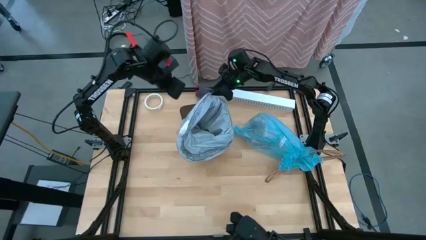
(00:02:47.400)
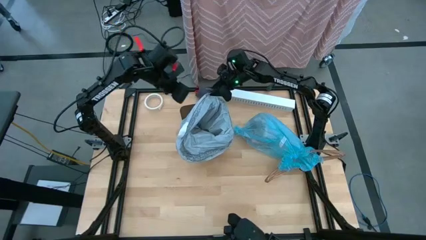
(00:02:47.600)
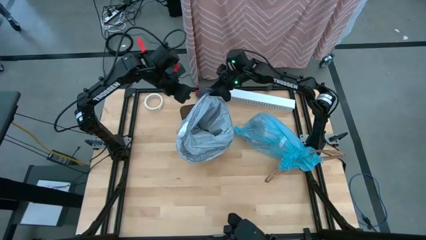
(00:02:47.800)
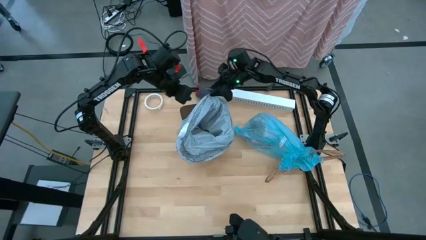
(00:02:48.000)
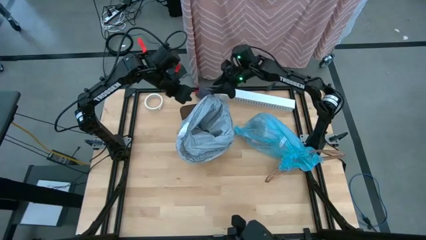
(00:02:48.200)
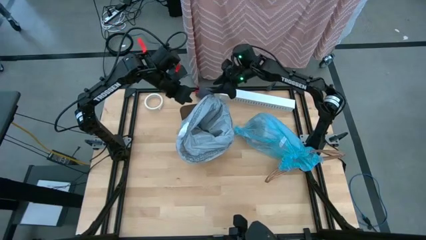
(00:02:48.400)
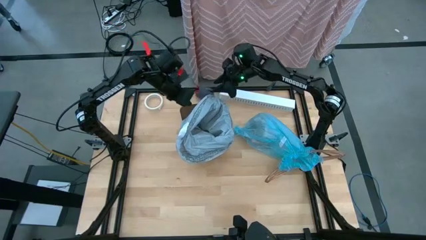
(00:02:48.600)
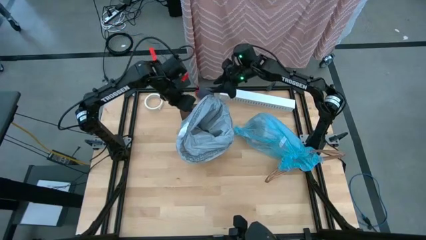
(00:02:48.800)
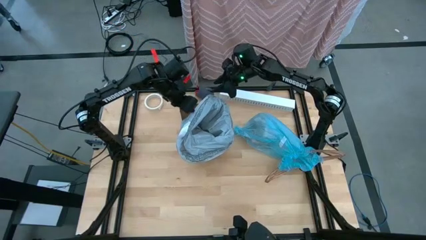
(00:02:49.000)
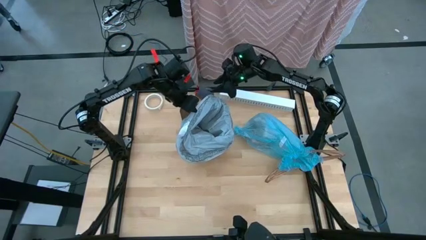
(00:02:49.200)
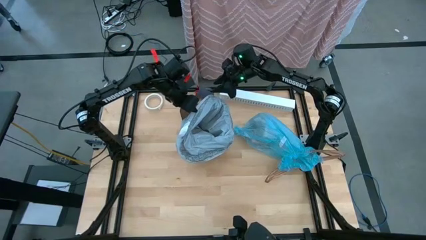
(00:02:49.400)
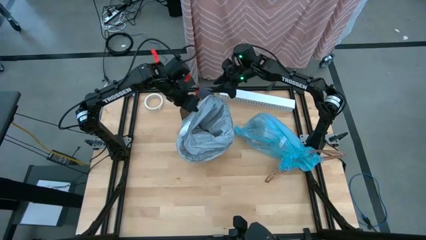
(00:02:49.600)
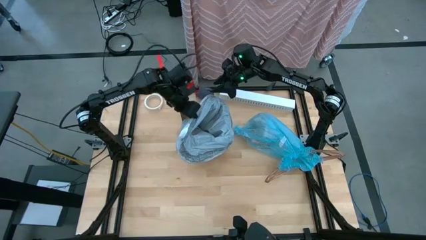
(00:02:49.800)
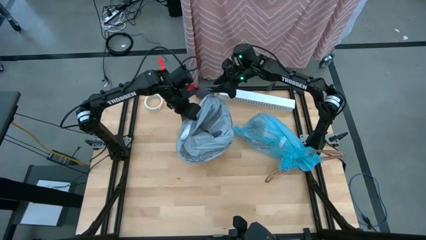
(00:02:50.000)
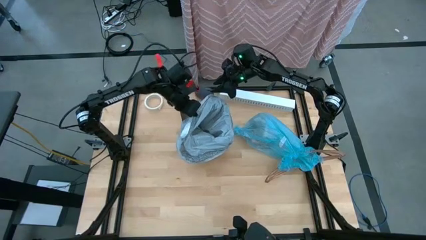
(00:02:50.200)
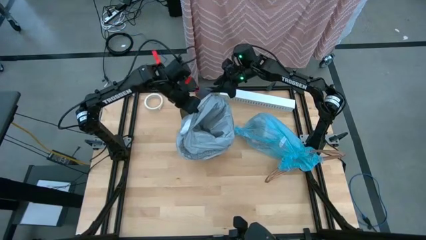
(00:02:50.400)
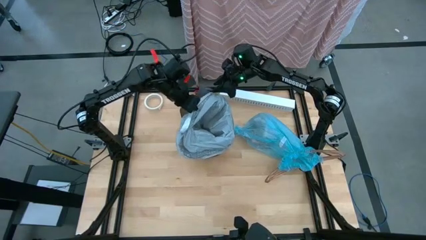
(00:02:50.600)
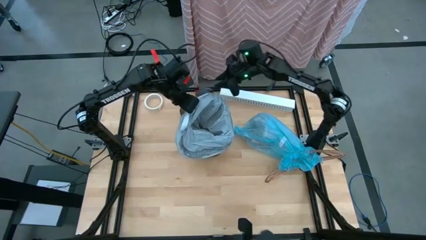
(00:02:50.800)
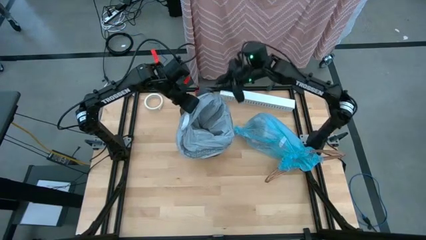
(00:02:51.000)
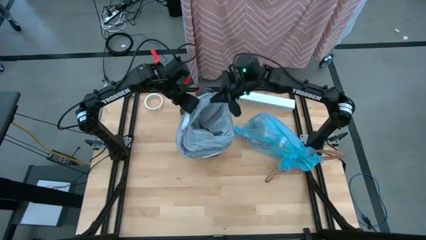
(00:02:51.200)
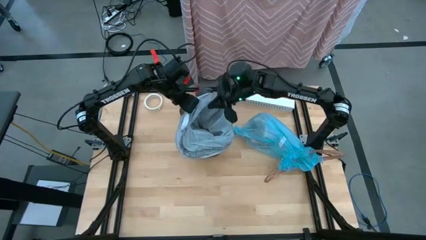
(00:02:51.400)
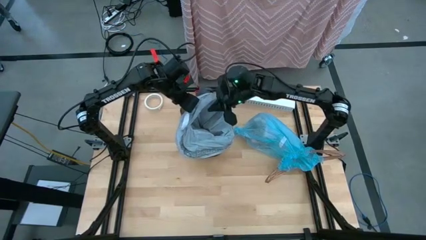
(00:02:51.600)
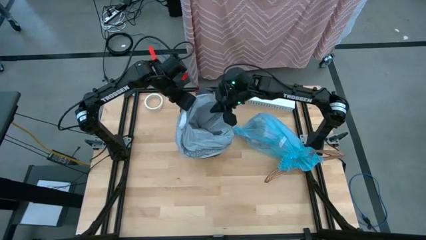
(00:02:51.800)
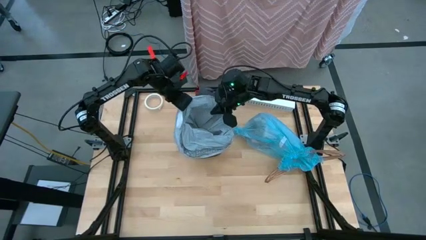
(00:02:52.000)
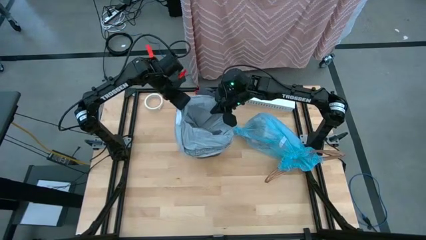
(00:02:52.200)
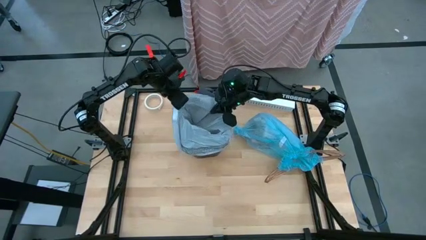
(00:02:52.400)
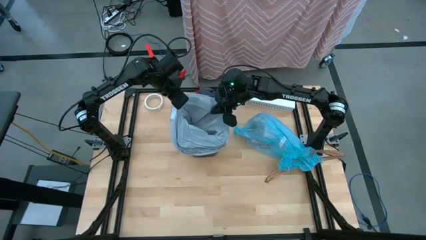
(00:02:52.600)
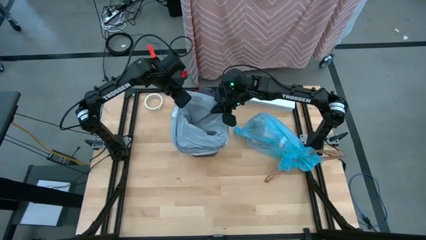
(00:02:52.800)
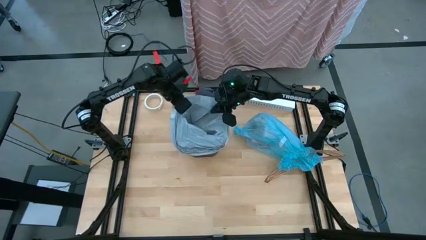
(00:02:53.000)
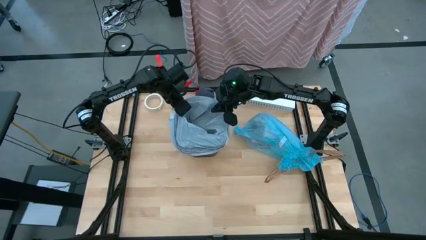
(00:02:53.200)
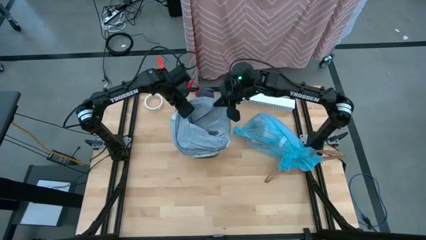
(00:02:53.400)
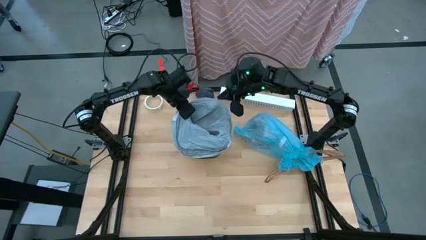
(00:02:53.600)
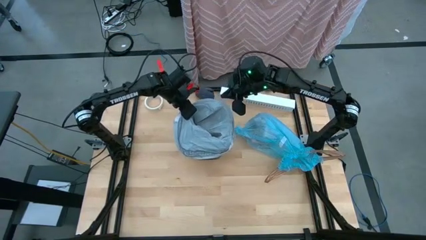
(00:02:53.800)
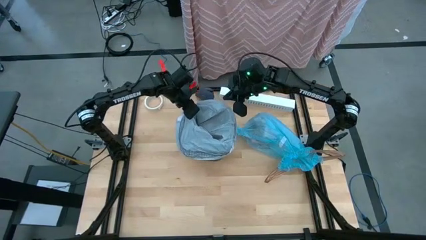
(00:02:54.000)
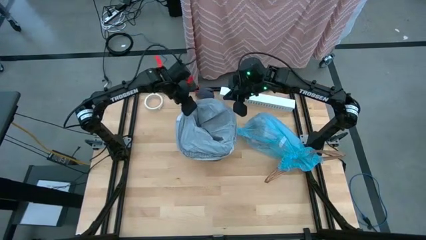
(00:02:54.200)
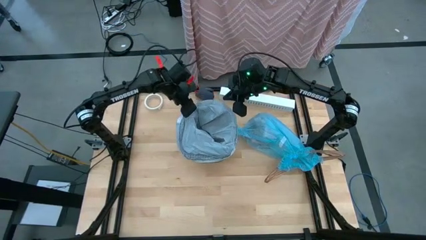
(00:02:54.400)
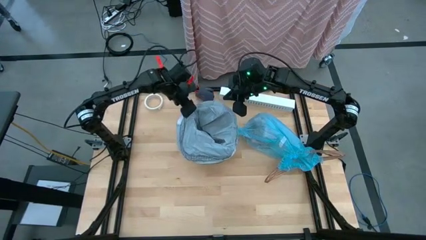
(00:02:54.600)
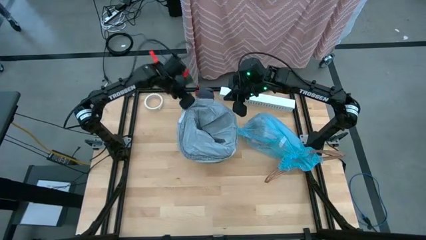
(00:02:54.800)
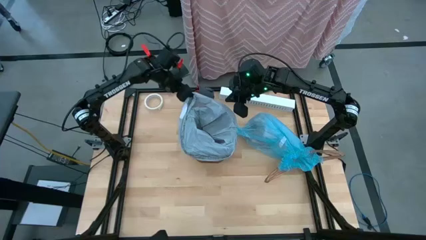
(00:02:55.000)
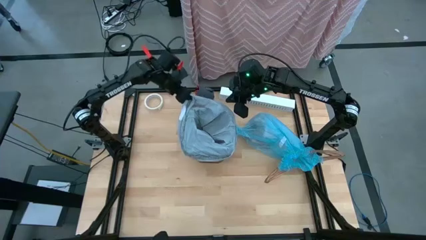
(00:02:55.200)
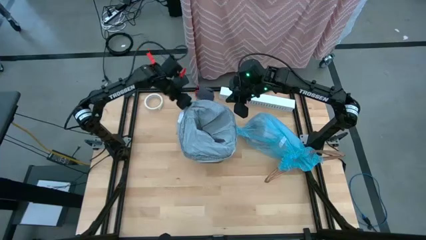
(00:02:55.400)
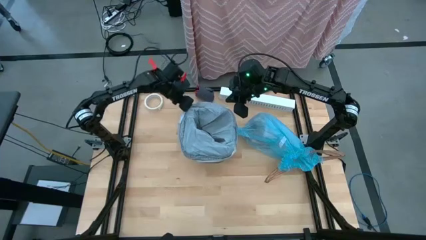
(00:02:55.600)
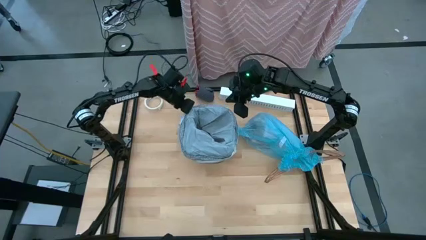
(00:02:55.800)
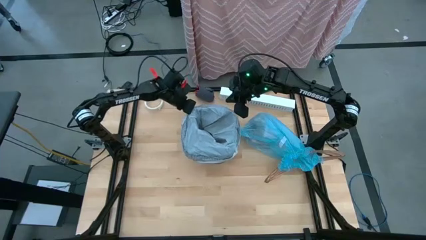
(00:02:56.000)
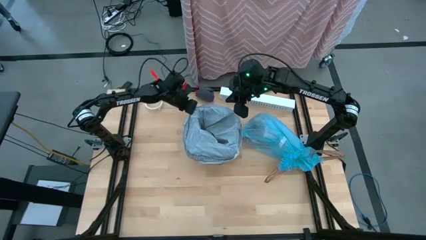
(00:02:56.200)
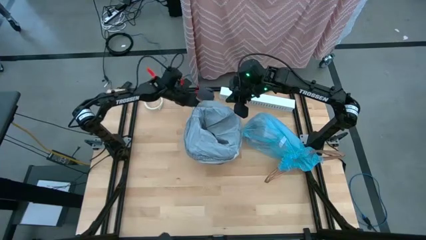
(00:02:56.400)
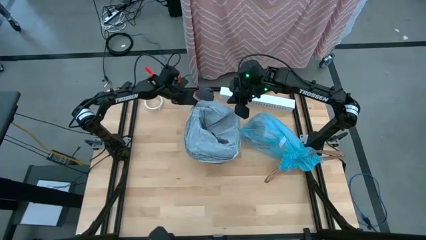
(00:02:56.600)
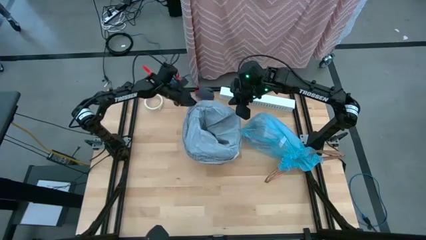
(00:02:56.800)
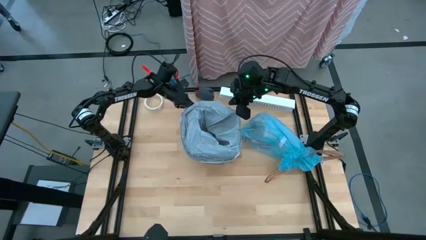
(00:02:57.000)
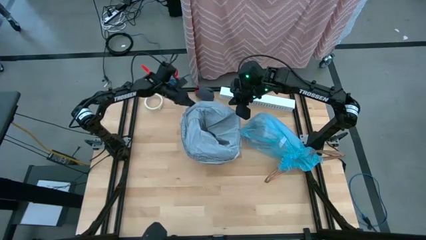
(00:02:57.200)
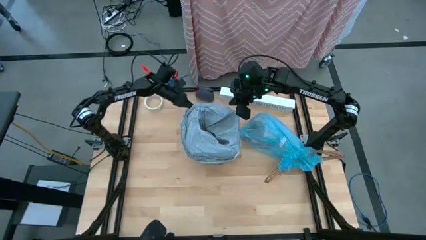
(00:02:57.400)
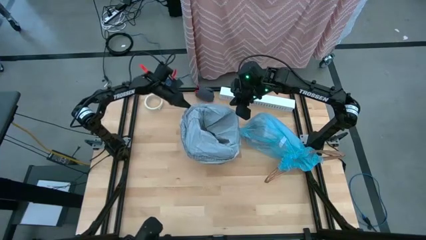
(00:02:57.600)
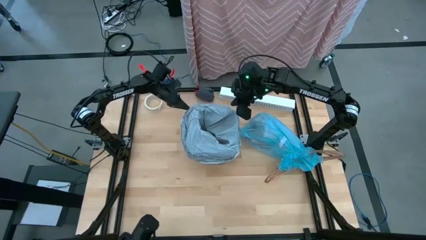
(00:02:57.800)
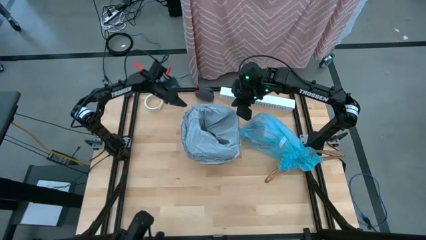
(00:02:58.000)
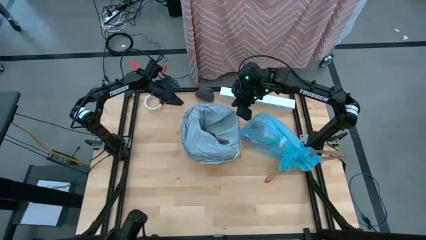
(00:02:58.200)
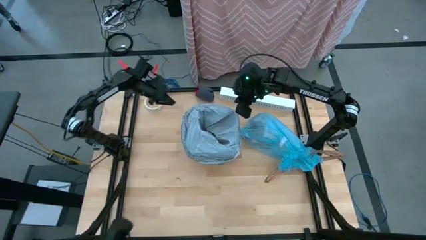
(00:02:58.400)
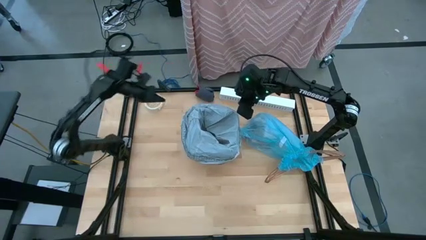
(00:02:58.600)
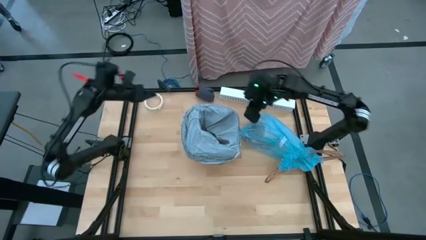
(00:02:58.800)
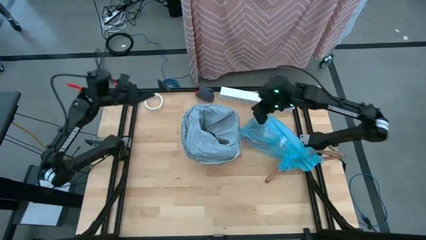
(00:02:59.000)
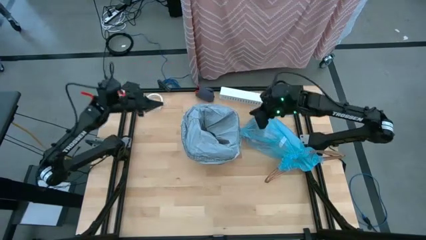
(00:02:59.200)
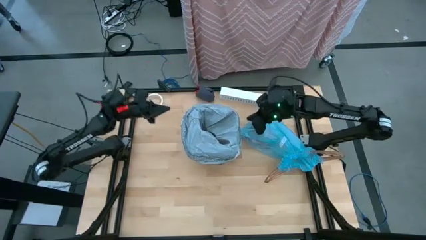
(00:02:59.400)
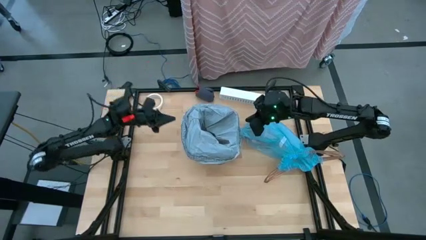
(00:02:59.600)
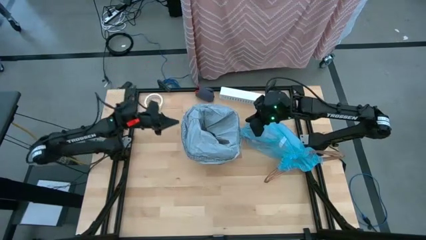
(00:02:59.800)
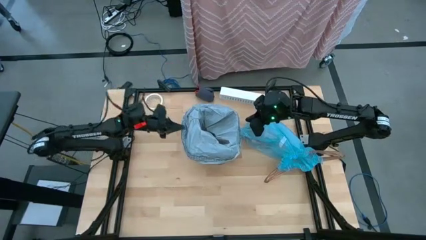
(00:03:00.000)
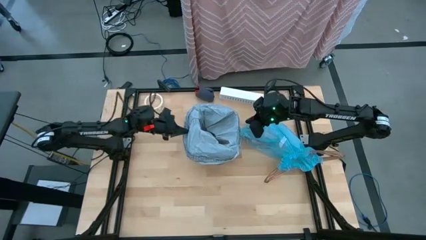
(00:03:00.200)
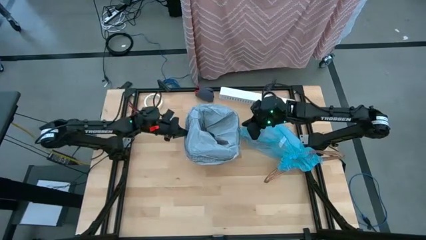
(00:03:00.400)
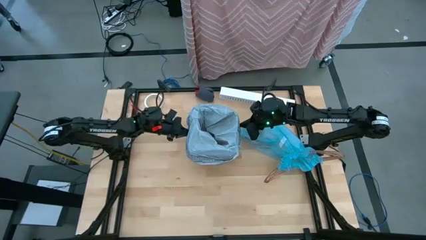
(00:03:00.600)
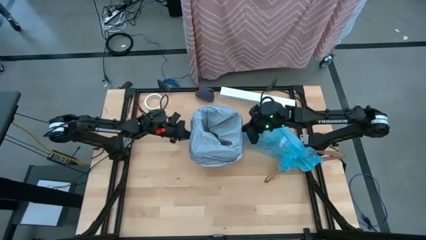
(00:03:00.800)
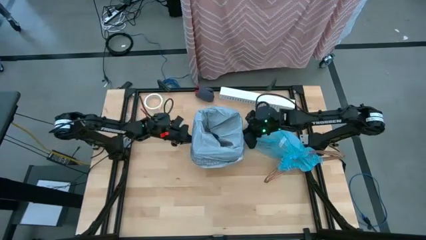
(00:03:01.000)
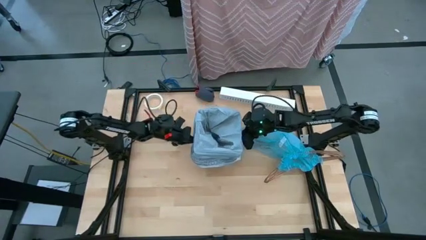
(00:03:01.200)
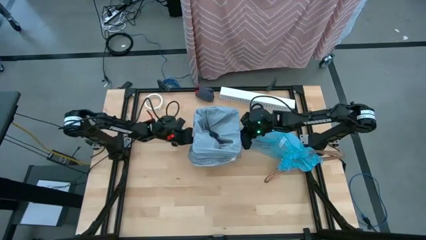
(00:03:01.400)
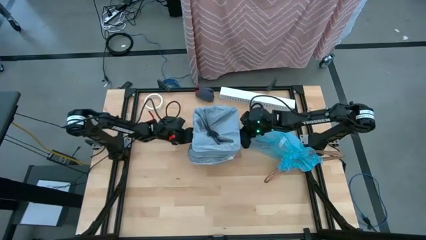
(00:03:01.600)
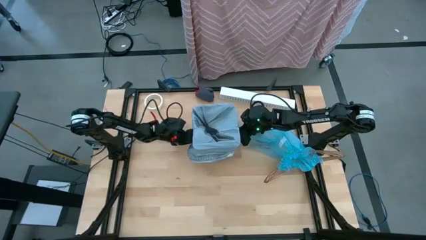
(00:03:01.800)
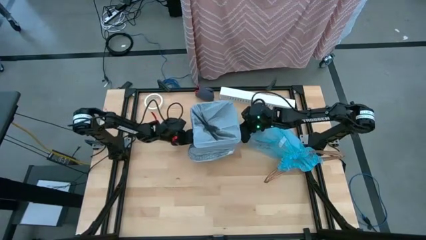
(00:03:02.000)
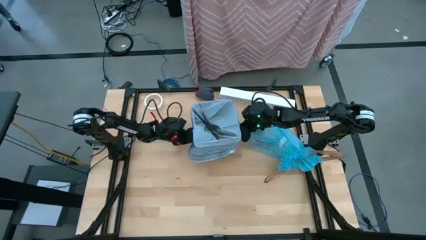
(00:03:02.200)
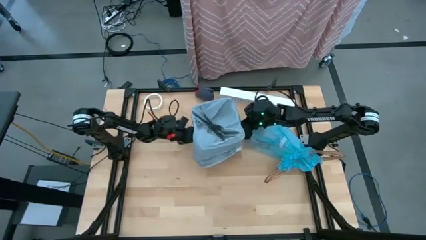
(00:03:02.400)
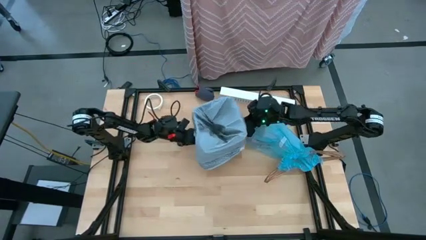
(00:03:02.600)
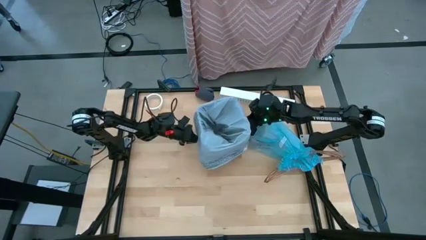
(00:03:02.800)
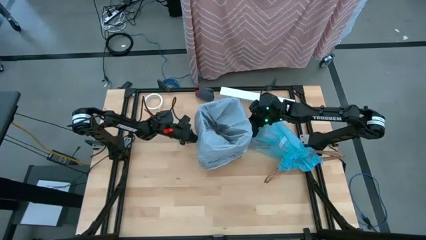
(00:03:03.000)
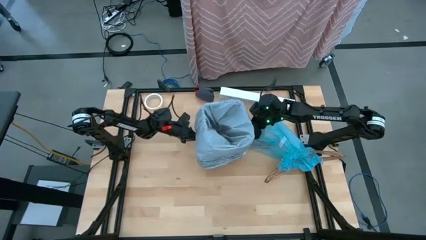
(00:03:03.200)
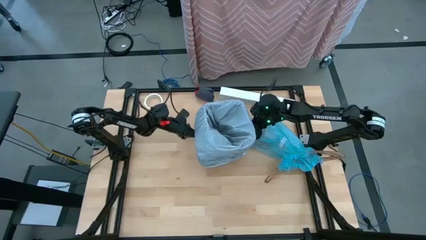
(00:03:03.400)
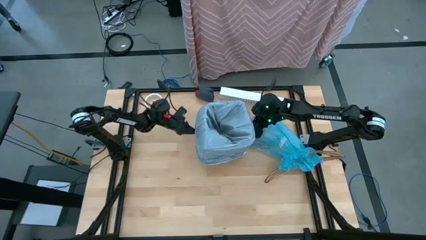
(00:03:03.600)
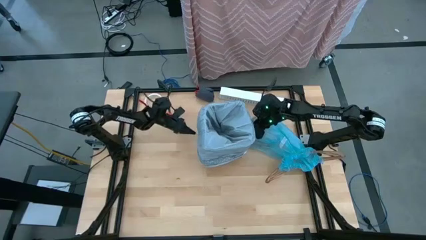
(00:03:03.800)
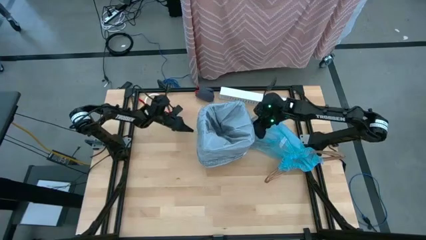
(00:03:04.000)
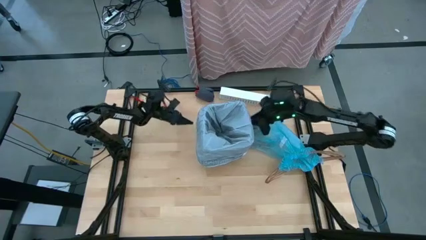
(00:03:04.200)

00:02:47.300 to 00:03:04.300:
Task: place trash/remove bag and relplace
Insert the new gray trash bag into the bin
